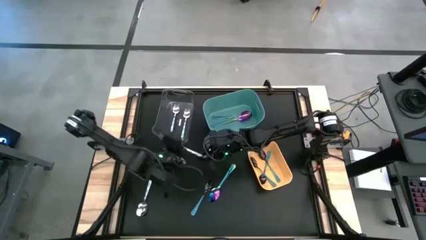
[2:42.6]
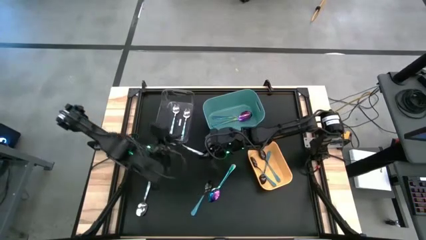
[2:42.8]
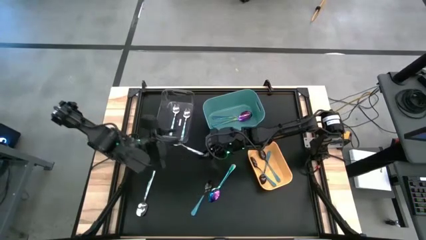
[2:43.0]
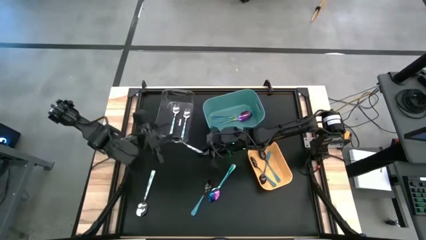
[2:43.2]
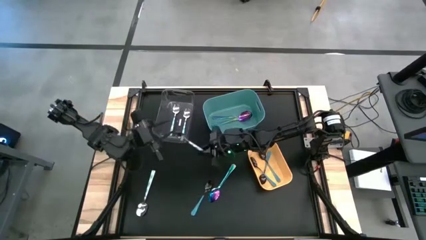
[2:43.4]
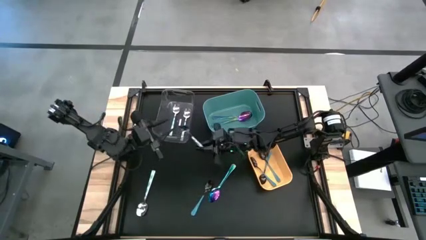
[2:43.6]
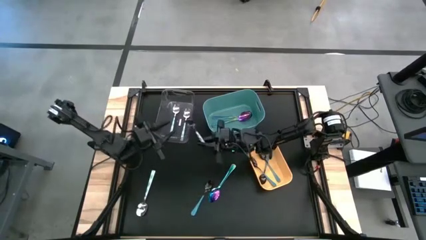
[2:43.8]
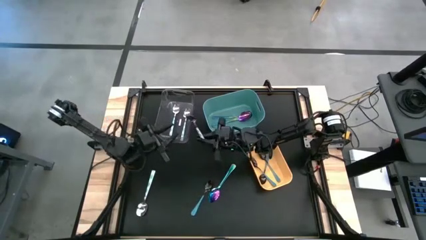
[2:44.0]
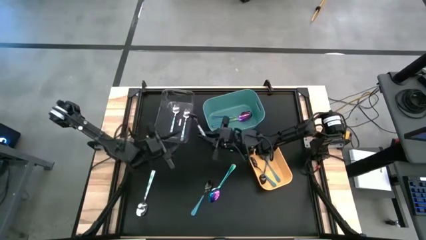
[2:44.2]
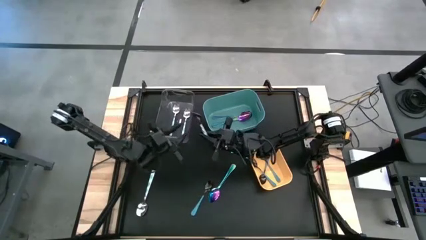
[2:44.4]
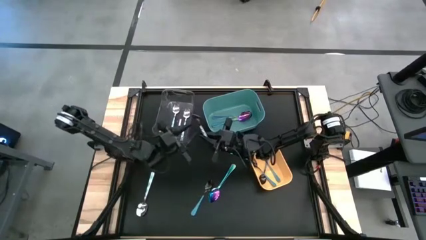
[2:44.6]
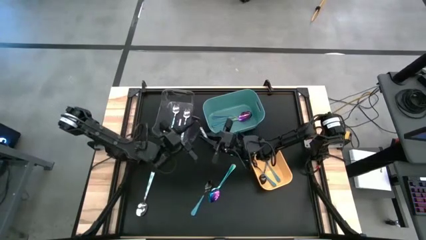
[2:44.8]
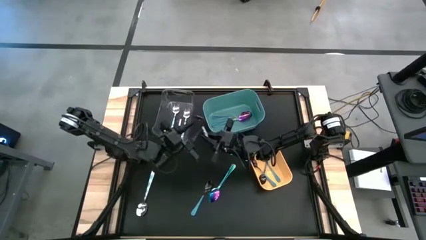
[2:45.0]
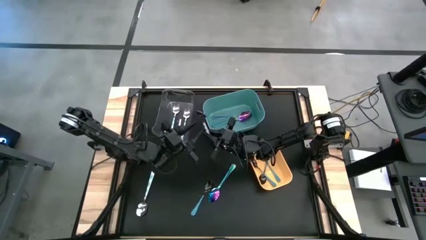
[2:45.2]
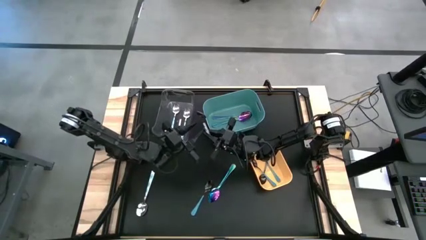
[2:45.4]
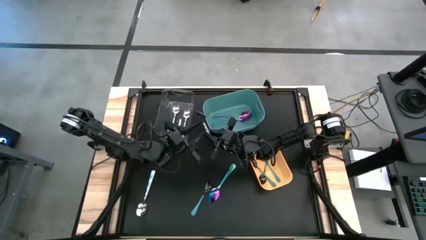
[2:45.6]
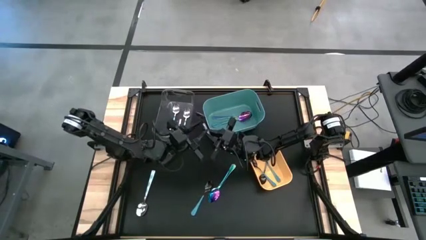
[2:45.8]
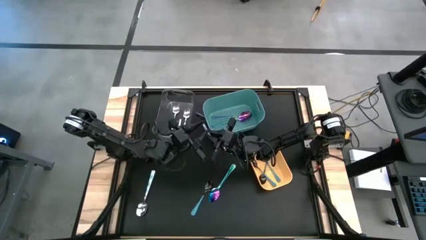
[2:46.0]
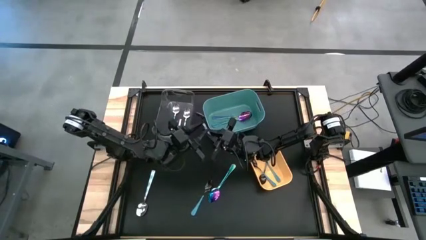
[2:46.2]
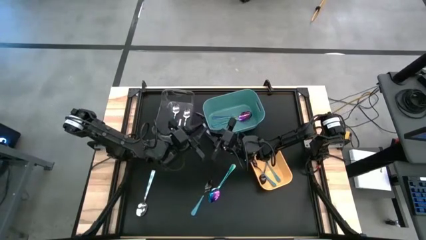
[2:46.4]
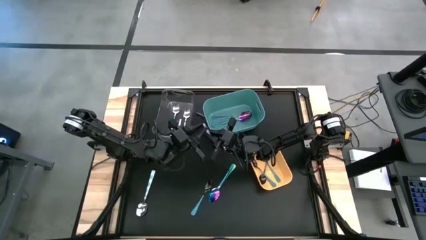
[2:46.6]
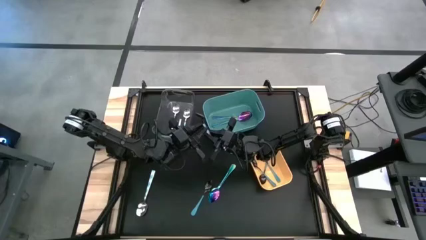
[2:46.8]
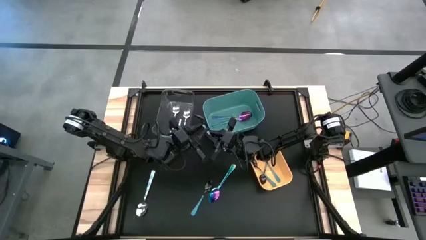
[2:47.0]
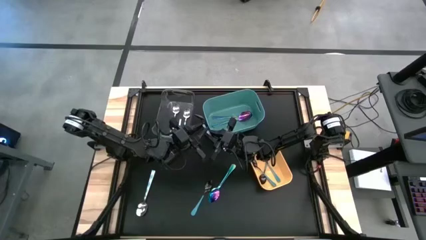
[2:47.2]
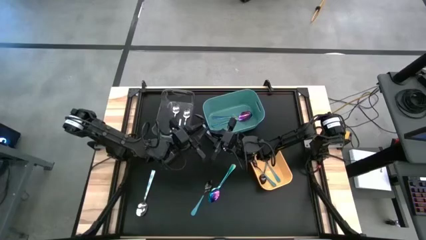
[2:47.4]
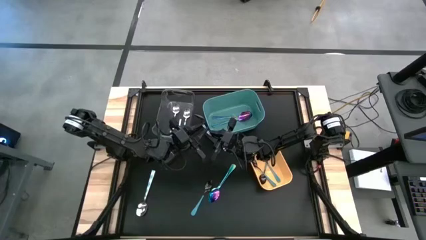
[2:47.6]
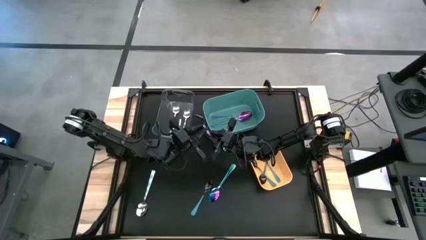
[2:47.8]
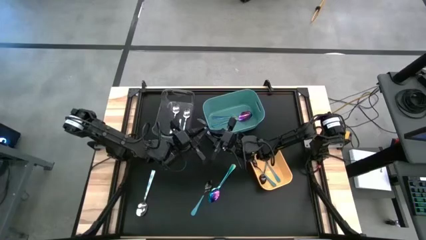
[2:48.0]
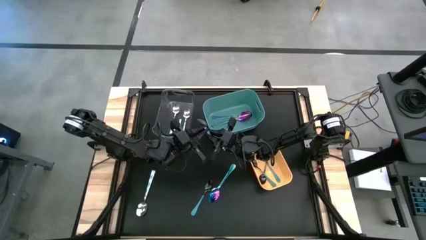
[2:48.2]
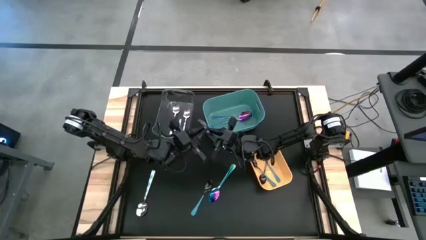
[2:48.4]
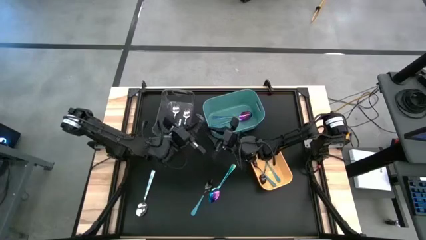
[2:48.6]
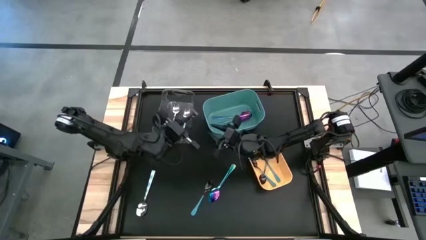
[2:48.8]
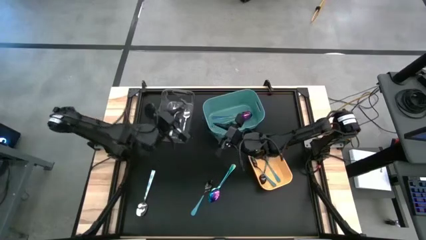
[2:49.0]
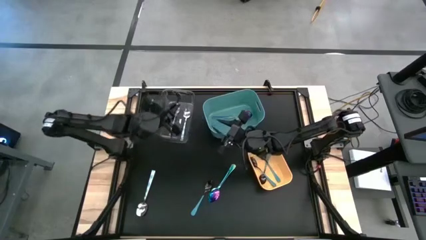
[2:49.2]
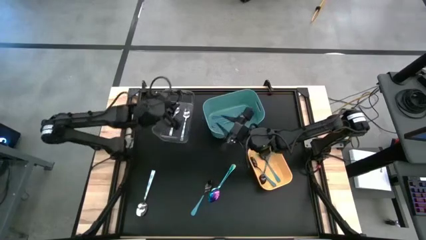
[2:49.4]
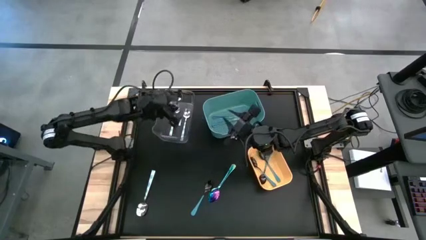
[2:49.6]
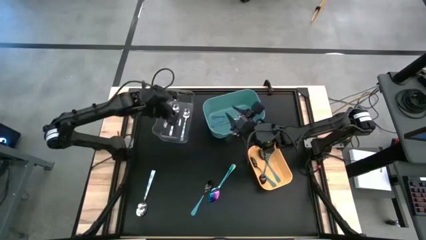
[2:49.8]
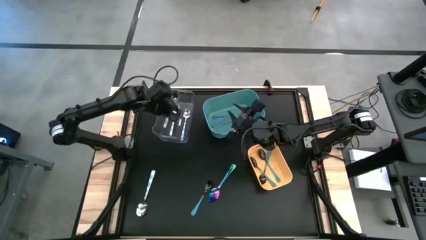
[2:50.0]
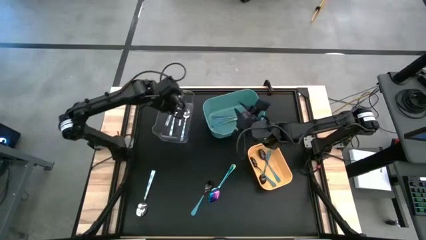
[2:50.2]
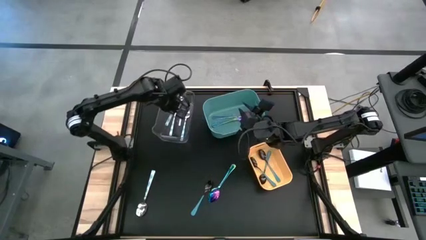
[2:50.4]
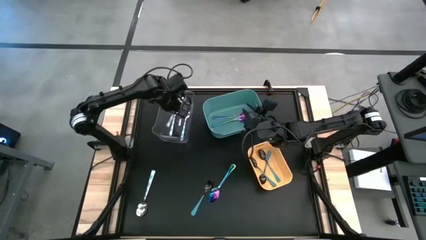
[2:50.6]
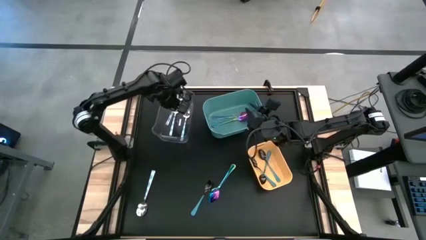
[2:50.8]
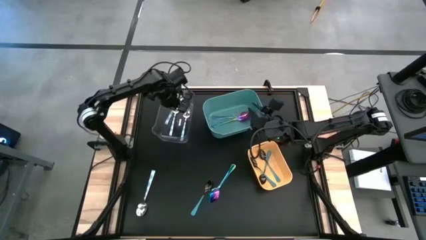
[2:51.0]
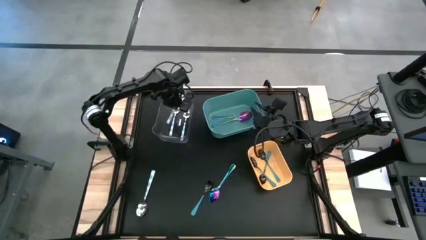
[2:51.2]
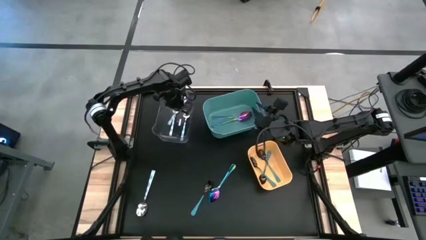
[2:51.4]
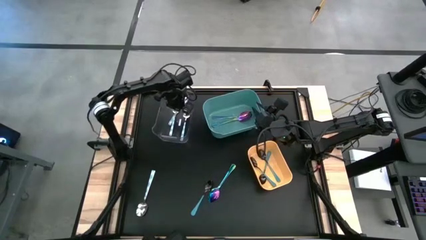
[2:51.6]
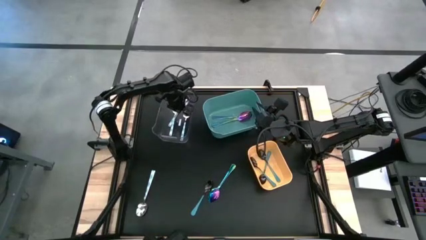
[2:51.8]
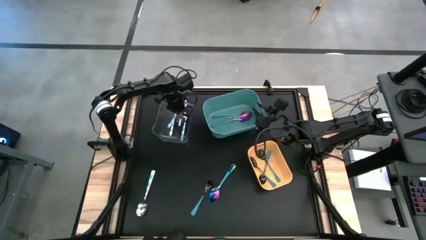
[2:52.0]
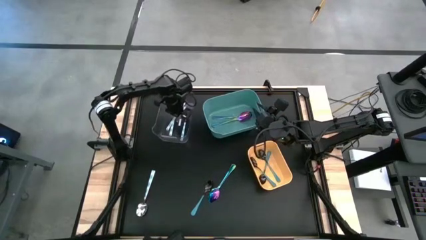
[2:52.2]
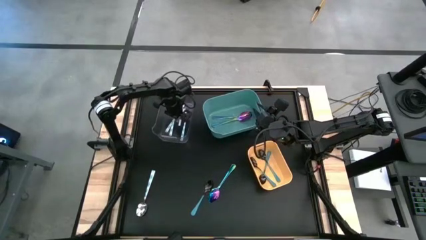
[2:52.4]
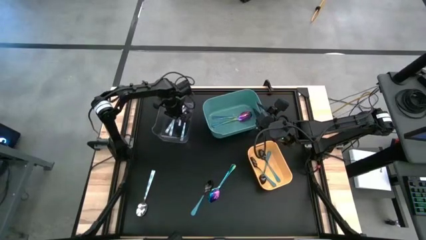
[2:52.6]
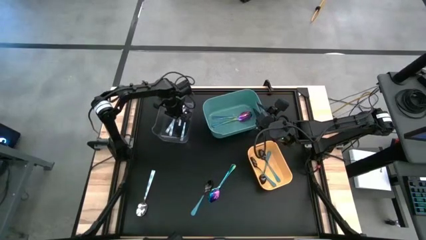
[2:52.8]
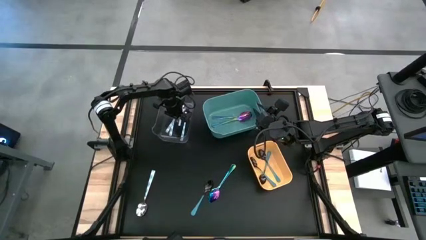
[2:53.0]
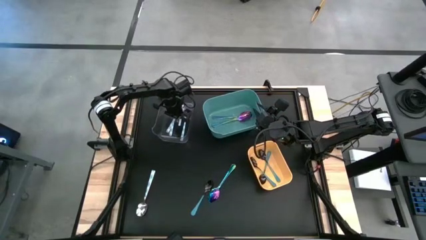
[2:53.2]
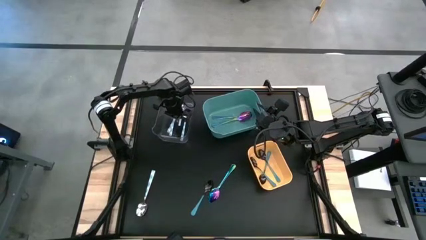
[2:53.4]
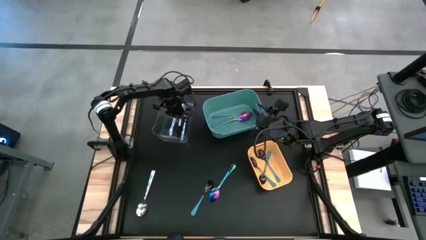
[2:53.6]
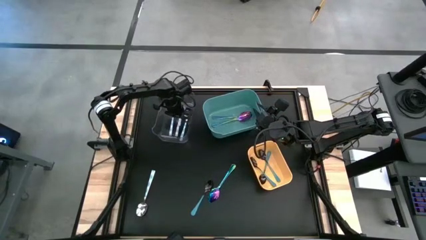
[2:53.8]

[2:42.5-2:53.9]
Task: Sort silverware by color (type)
Put the patterned blue spoon into the transparent bin

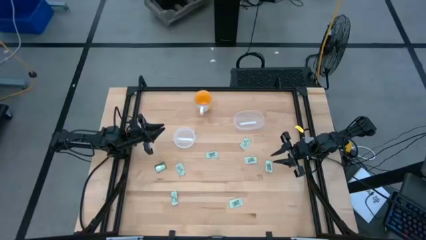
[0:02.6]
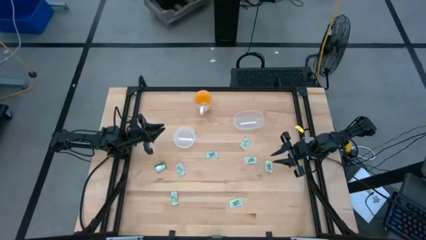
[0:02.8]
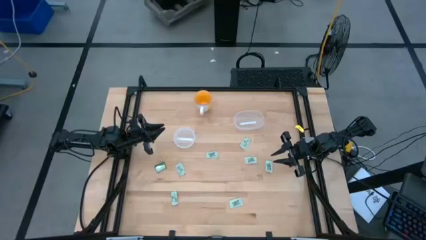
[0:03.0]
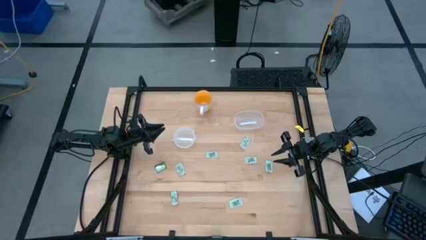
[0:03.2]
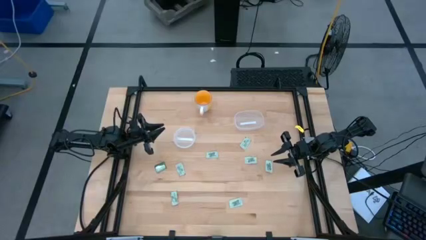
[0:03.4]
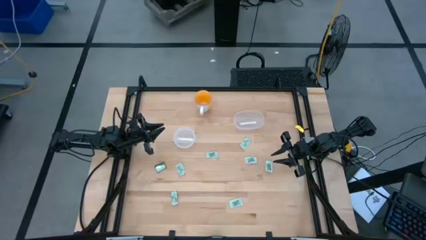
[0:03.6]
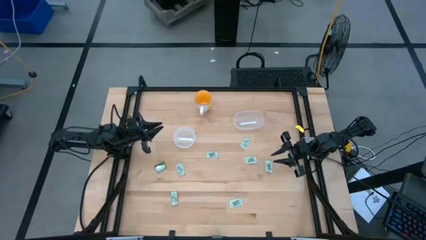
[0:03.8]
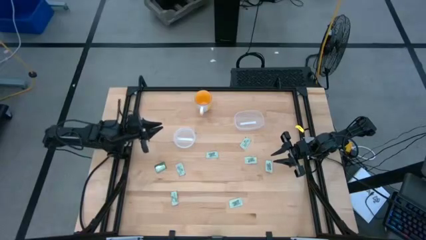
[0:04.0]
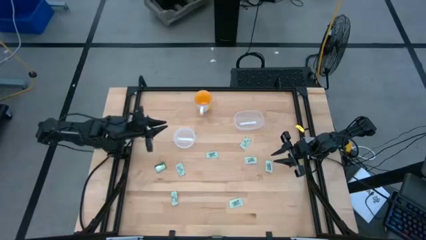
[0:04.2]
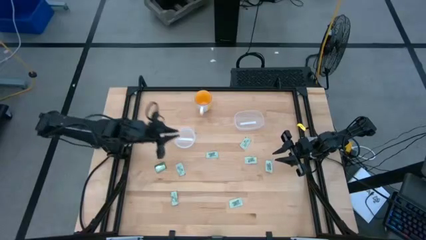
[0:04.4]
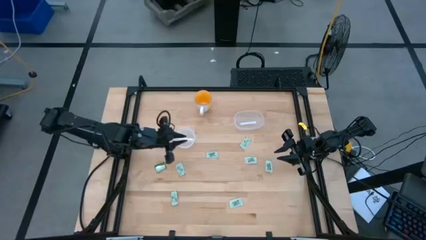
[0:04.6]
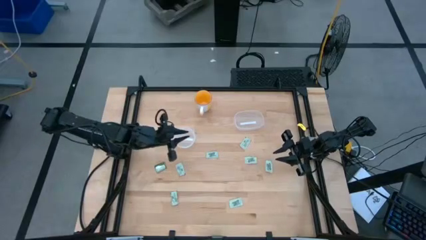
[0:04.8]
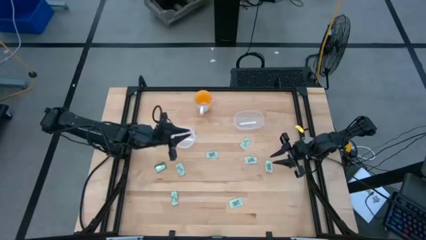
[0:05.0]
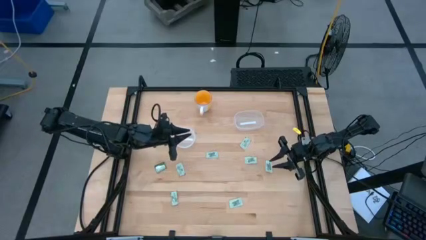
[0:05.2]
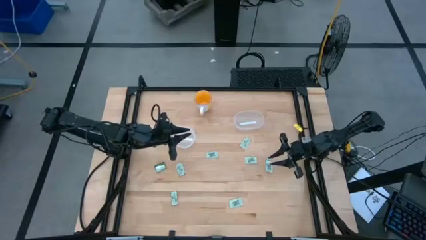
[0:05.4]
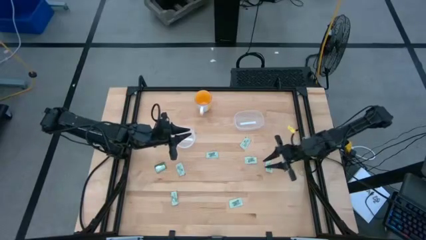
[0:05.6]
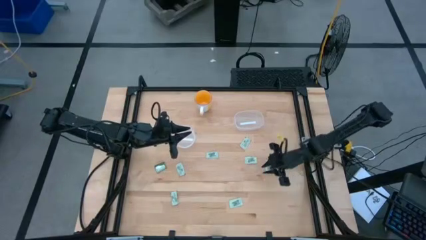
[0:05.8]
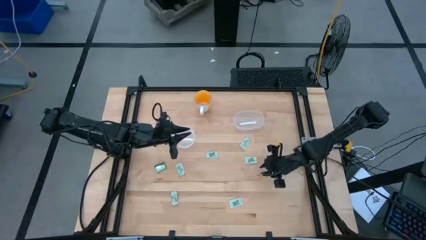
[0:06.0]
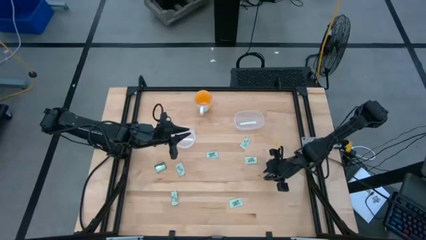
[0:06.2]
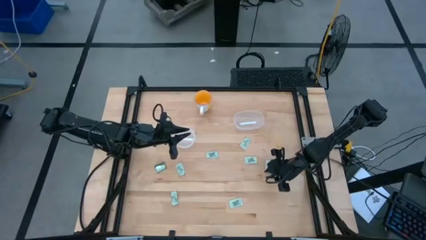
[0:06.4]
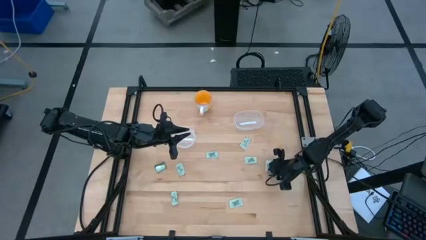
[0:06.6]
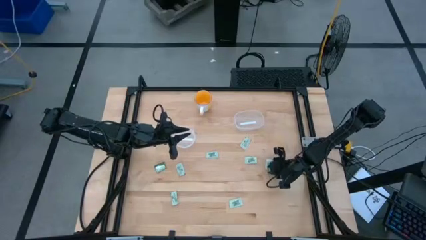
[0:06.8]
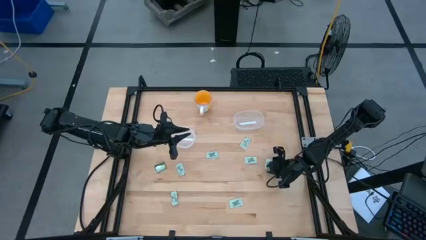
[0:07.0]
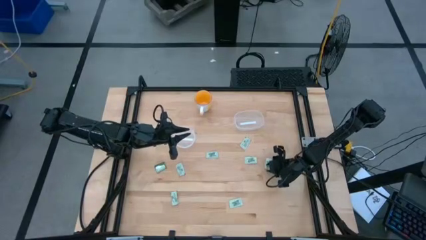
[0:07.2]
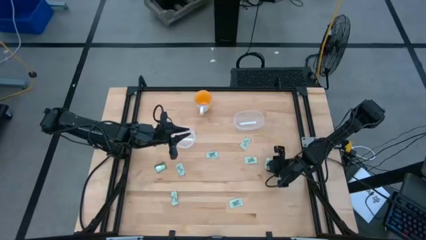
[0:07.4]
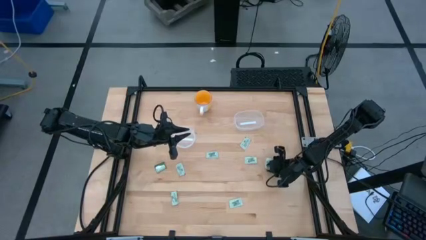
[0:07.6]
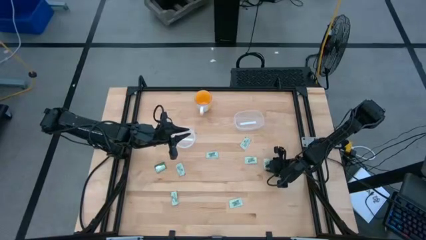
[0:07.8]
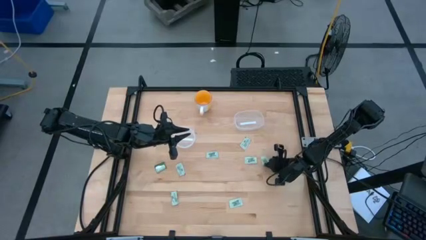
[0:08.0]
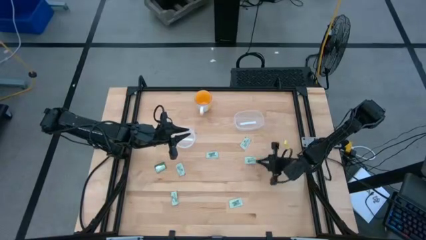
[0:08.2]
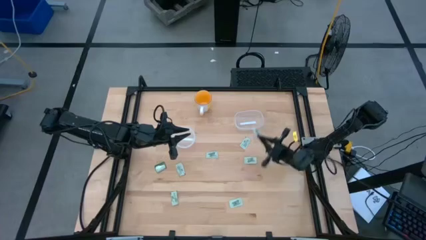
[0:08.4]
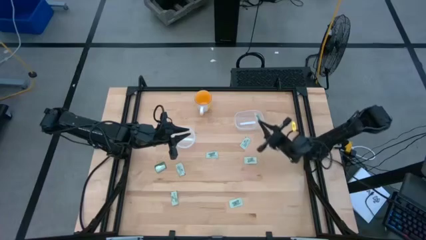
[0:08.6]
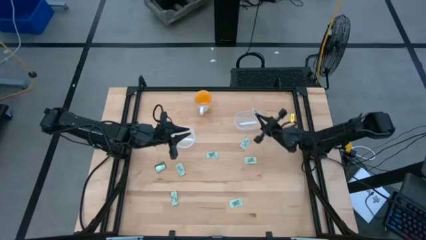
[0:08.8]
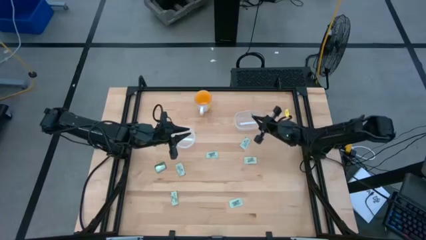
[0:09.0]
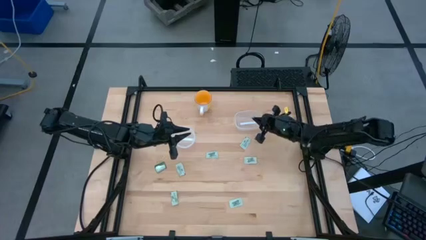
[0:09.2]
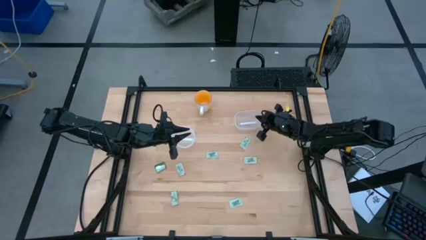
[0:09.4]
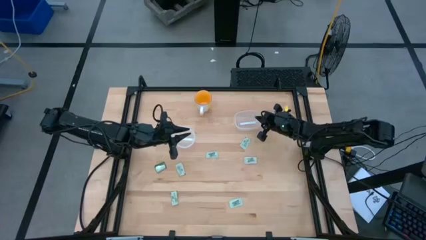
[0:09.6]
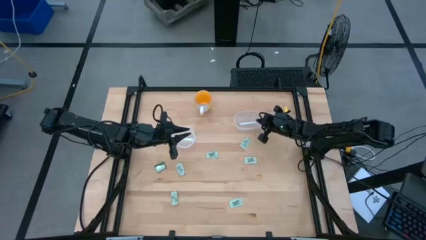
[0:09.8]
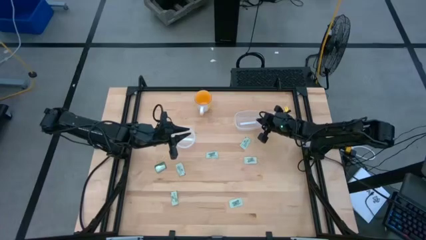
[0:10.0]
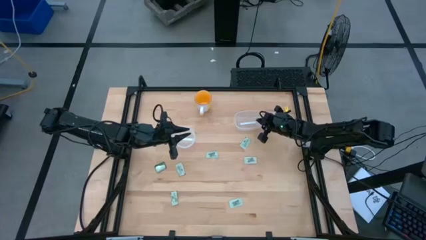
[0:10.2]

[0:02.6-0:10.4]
Task: Pick and place Stevia / Truvia into bins
Put the white stevia packet into the right transparent container
